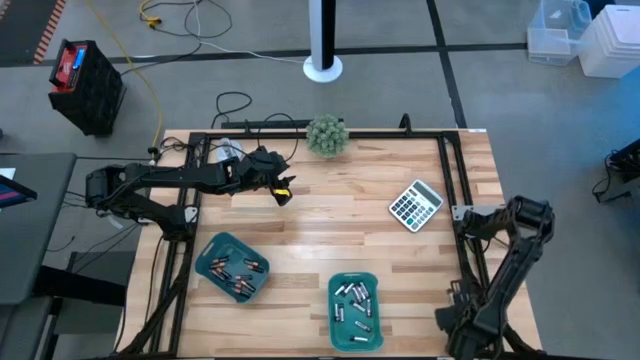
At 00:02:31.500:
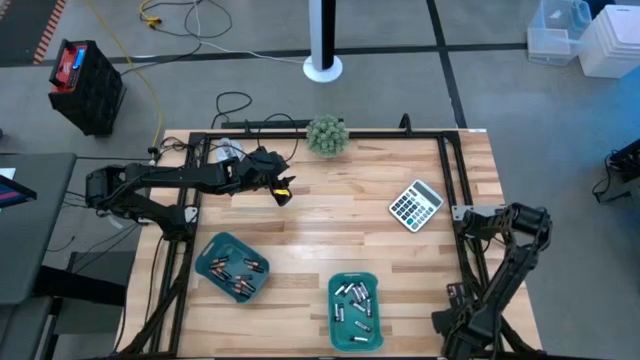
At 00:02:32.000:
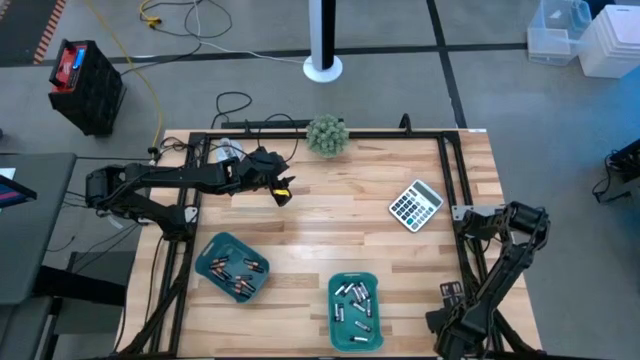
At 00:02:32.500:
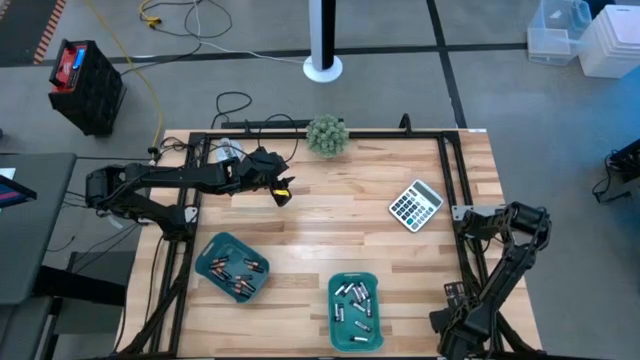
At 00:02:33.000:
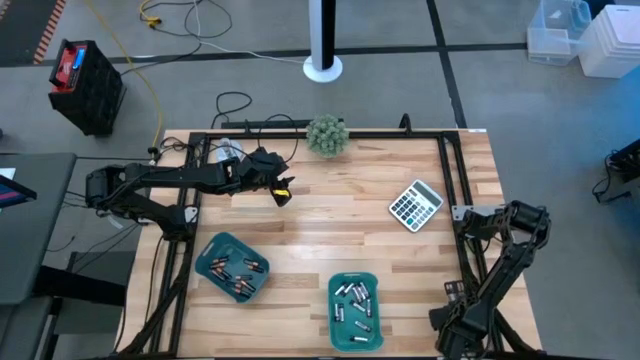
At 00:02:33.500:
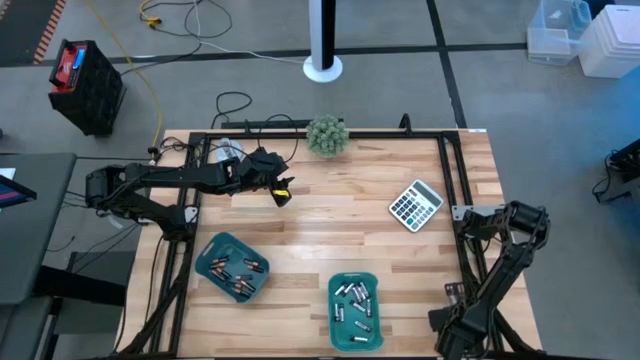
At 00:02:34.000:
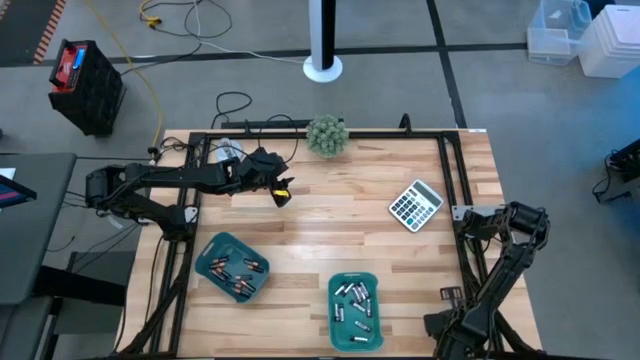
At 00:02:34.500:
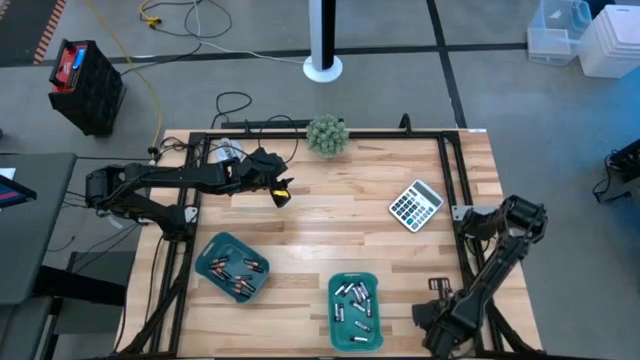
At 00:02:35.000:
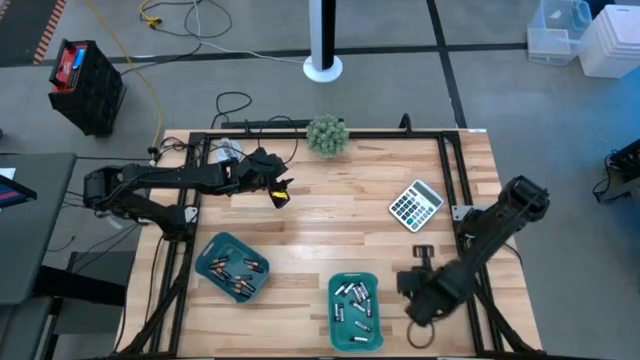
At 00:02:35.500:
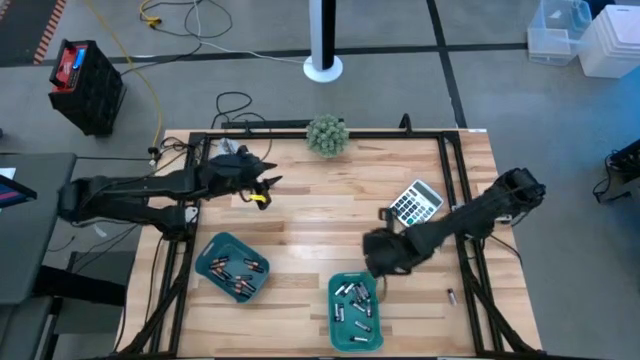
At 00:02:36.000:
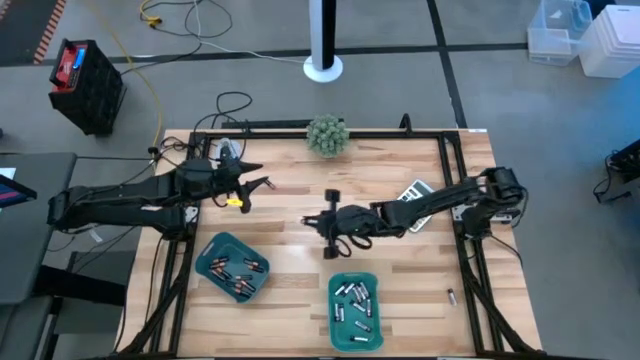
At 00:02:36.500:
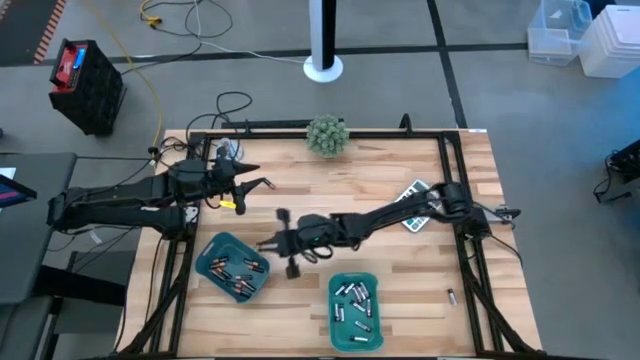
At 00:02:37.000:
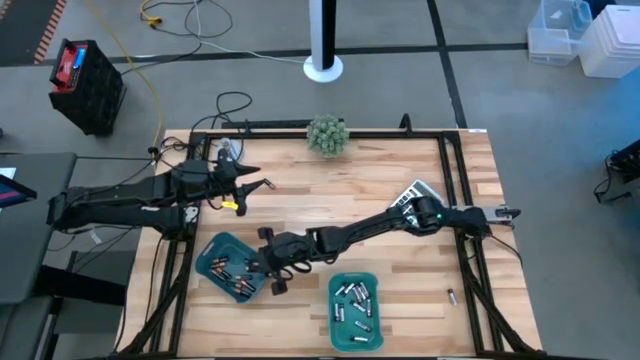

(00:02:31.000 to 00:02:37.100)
Task: Sort batteries
Put the black battery into the blue bin

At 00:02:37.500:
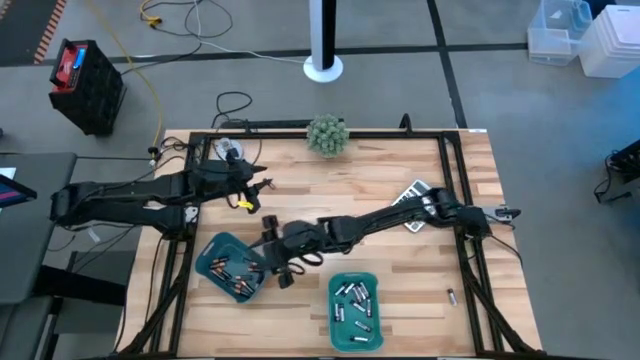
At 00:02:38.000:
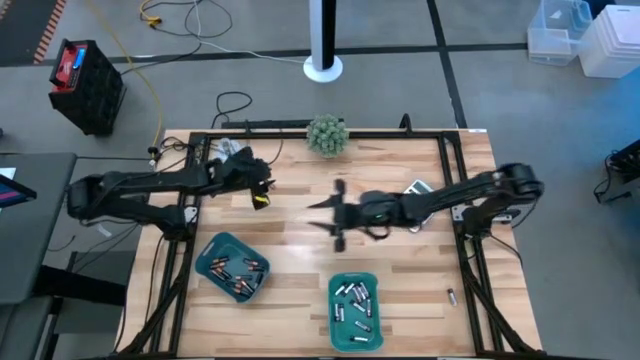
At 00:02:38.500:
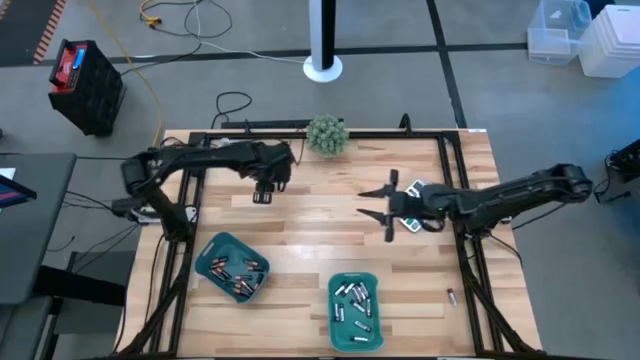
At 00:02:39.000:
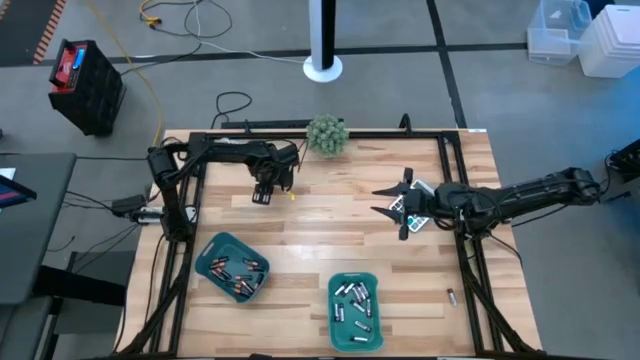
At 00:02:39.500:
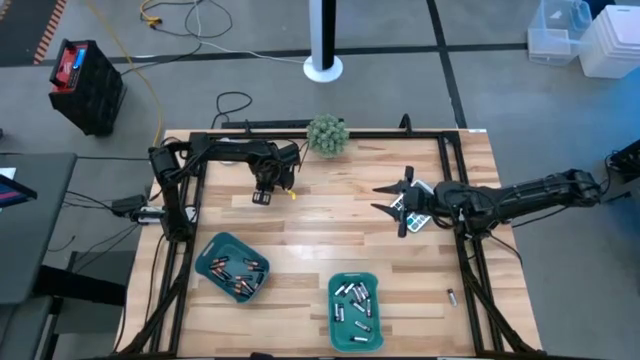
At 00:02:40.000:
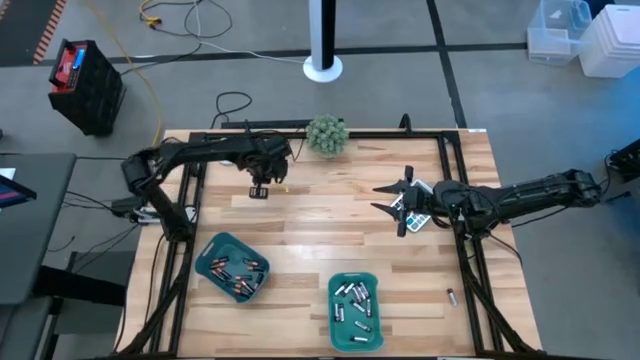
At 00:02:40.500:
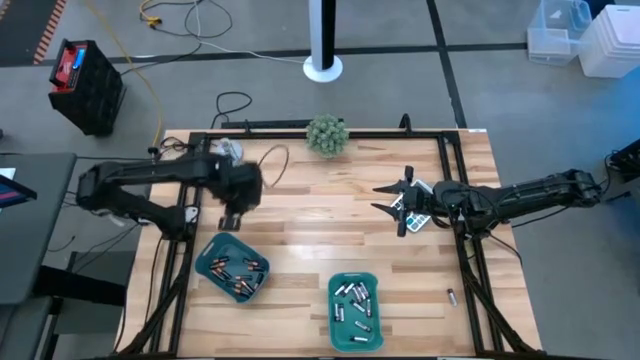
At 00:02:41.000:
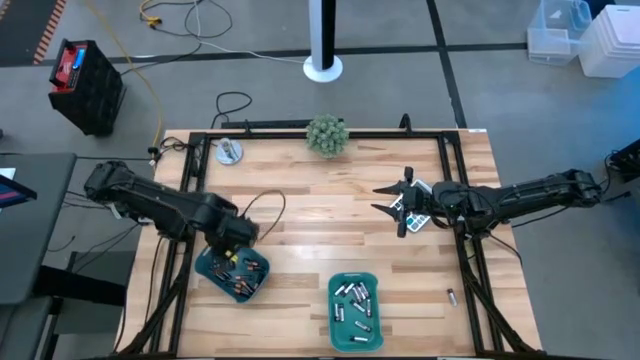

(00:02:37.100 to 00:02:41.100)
Put the black battery into the blue bin

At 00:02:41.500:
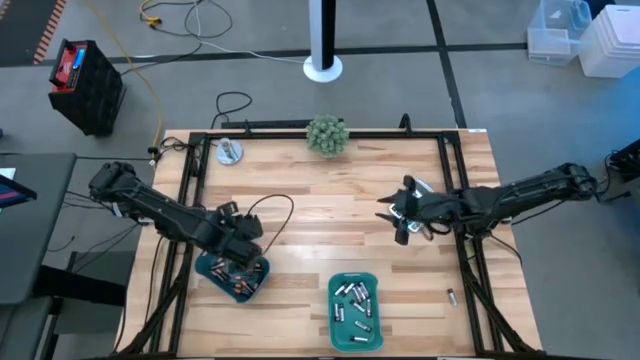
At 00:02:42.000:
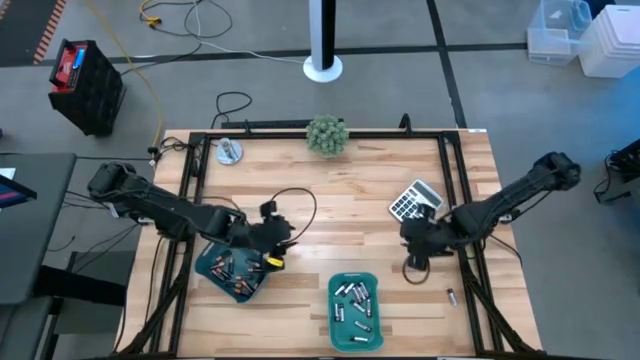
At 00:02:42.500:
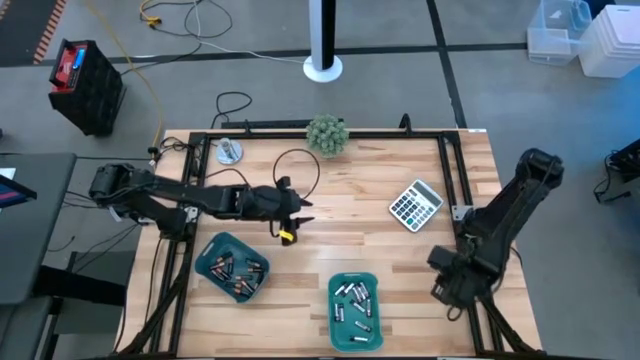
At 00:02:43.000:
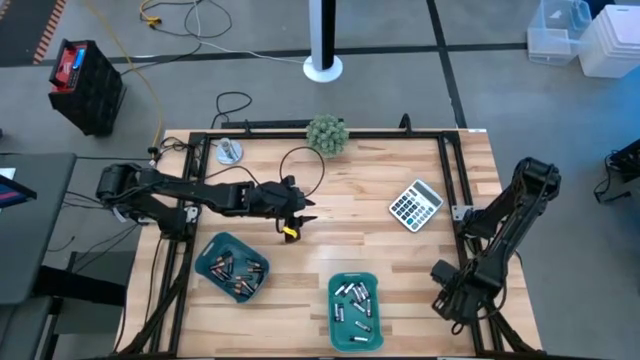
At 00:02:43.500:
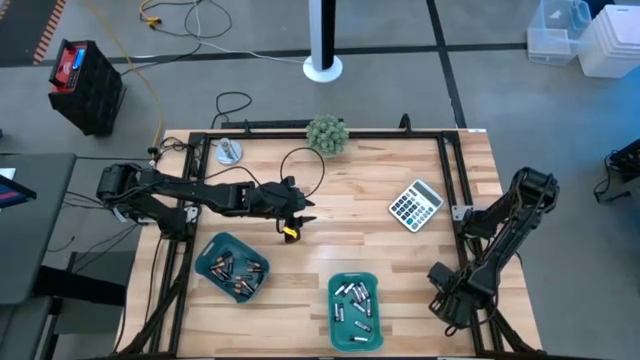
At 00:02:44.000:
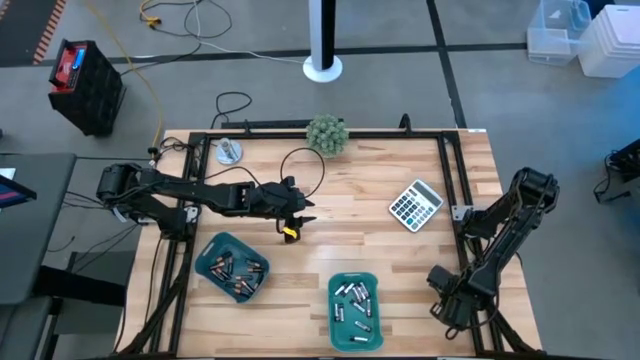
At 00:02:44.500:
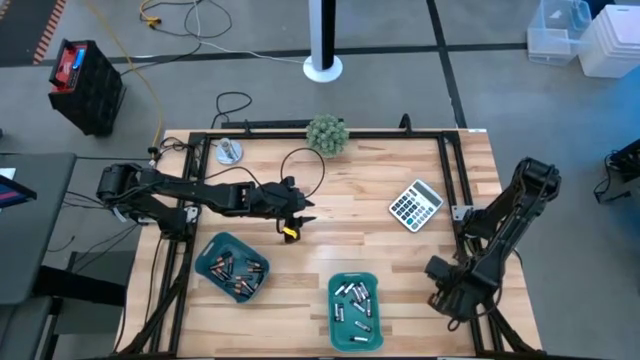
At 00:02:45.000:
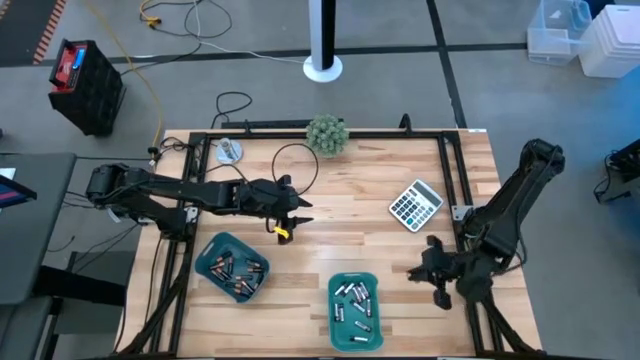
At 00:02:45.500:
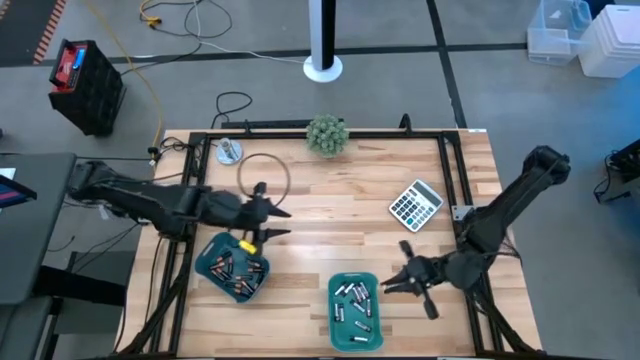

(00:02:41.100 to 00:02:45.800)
Put the silver battery into the green bin

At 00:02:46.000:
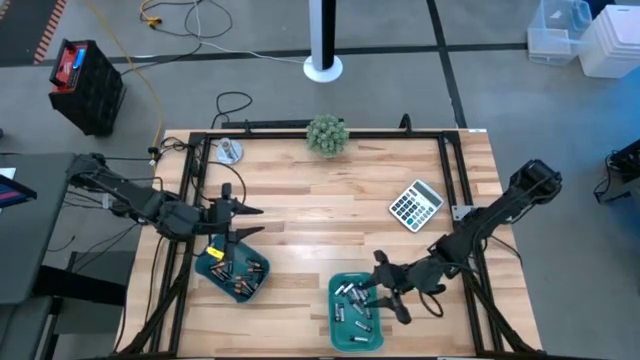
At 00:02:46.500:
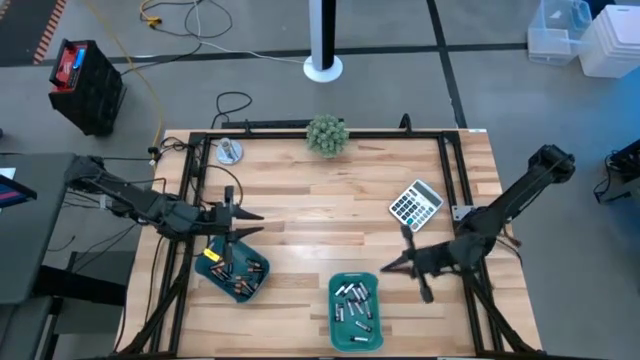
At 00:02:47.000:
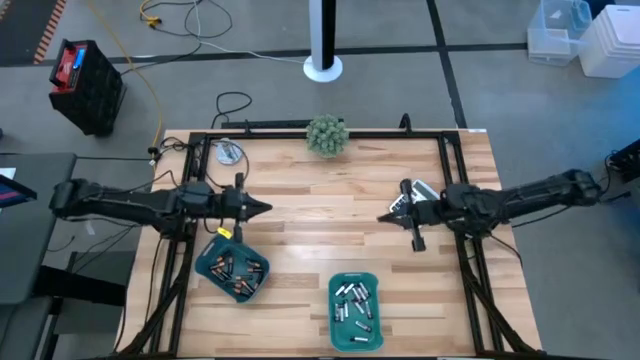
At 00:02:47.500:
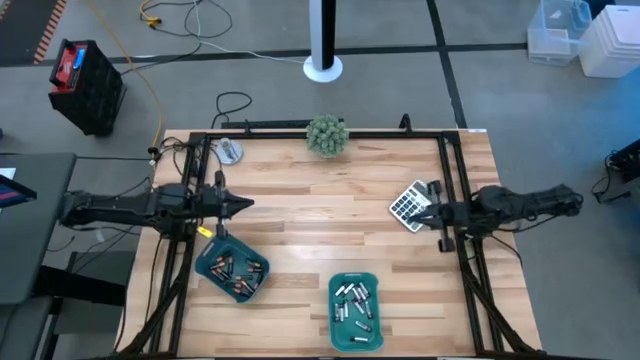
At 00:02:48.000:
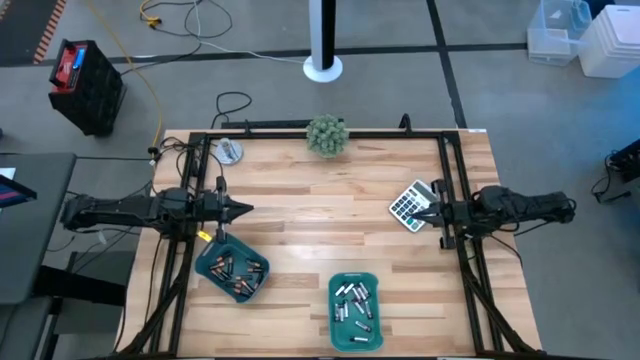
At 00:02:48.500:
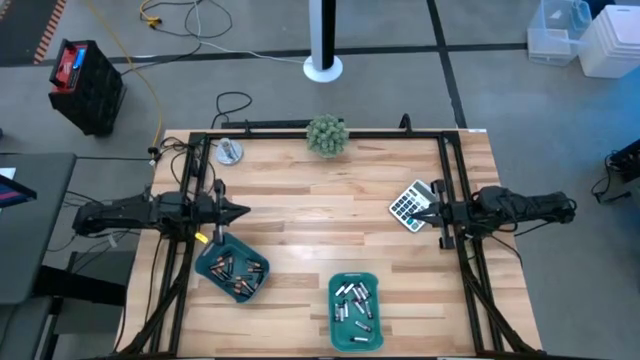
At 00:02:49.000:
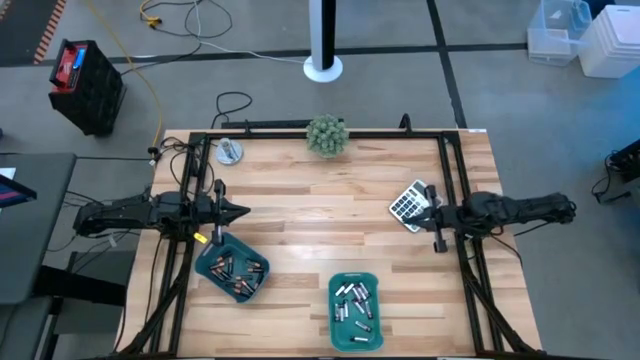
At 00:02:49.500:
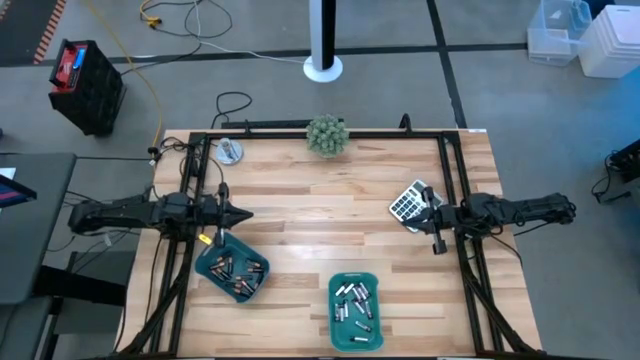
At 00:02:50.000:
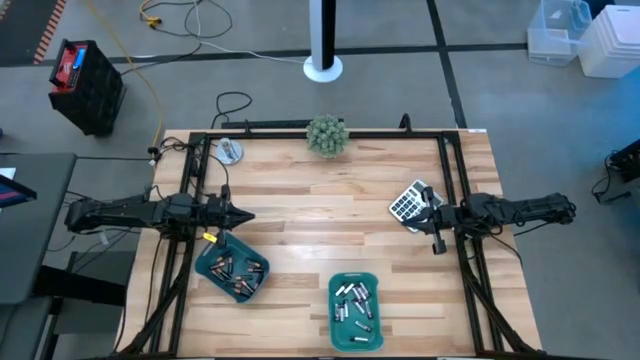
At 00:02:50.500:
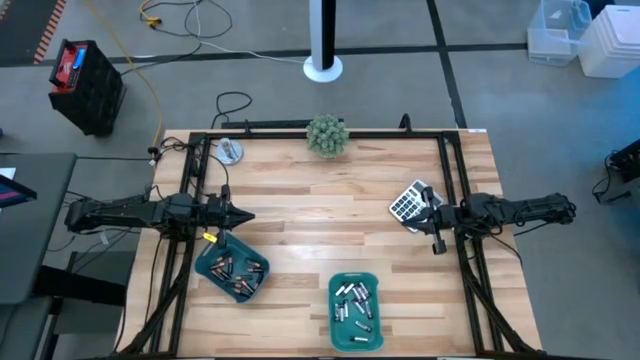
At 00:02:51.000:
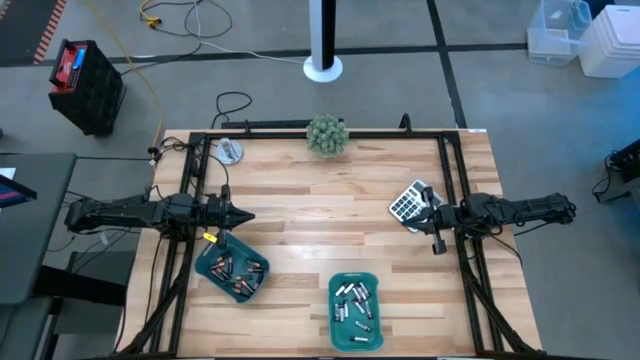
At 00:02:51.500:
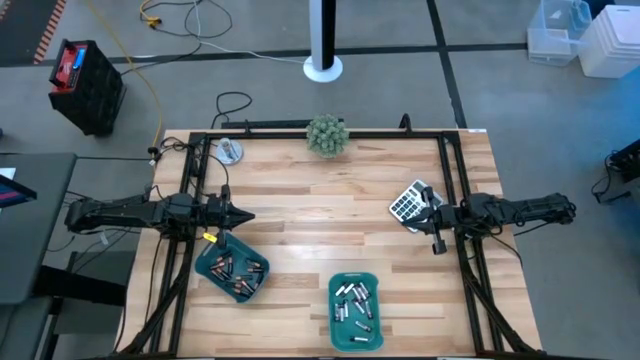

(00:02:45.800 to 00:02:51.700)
Return to Home Position
